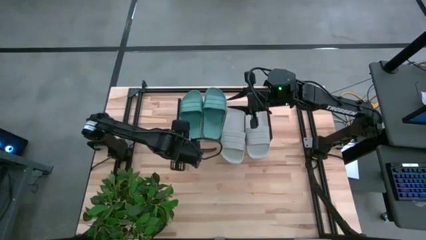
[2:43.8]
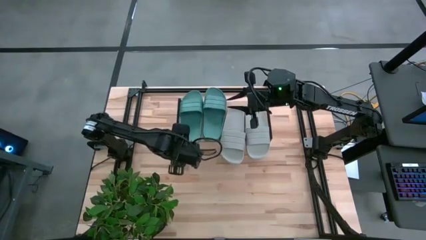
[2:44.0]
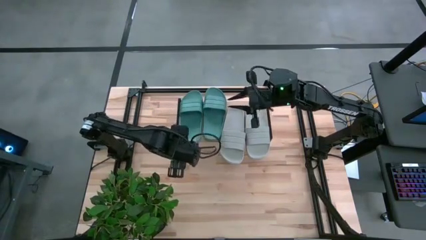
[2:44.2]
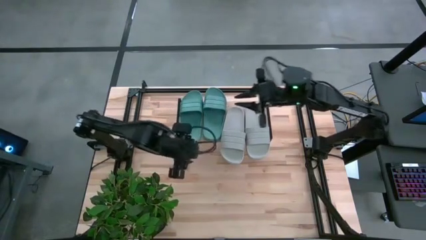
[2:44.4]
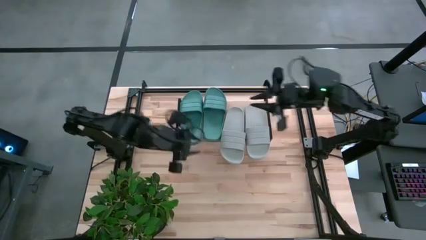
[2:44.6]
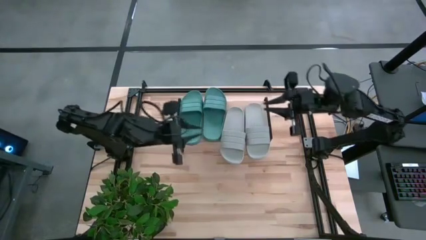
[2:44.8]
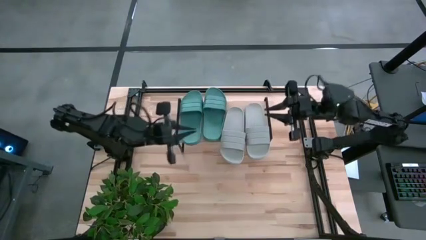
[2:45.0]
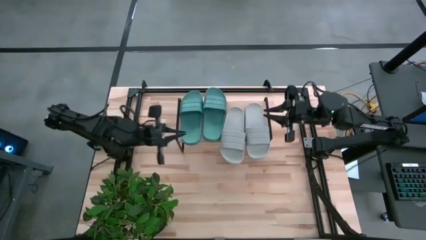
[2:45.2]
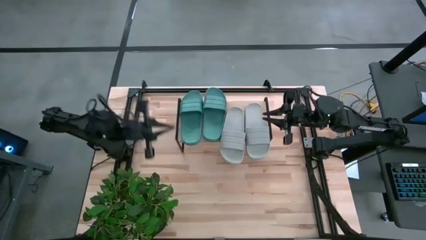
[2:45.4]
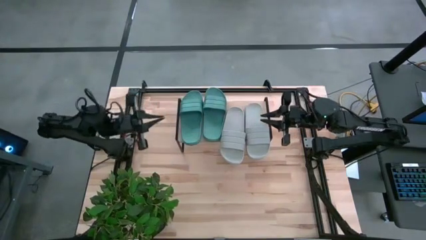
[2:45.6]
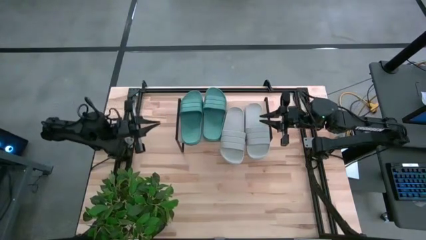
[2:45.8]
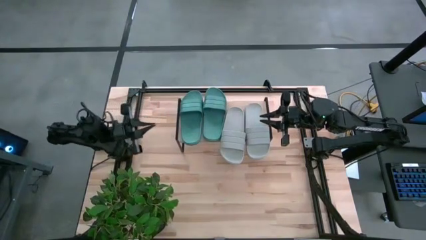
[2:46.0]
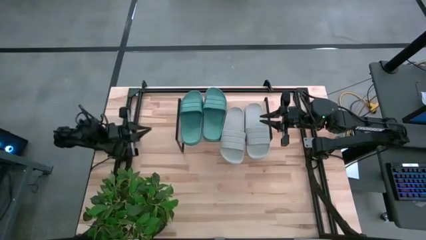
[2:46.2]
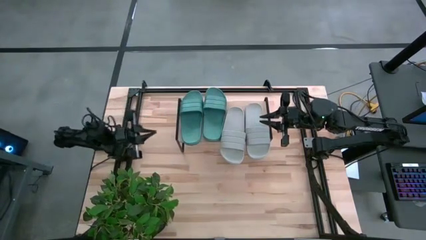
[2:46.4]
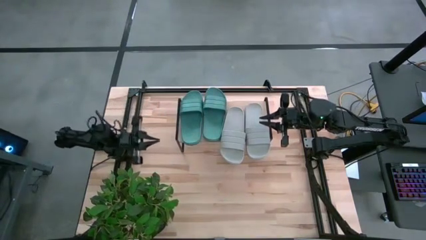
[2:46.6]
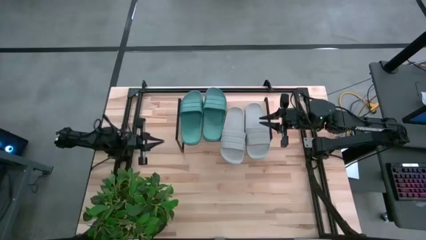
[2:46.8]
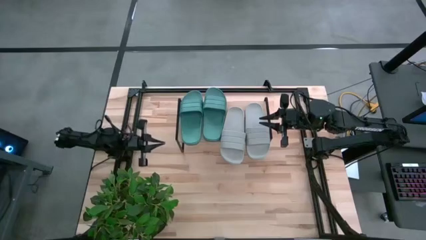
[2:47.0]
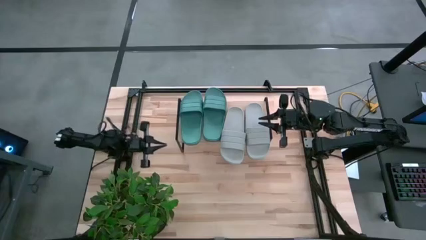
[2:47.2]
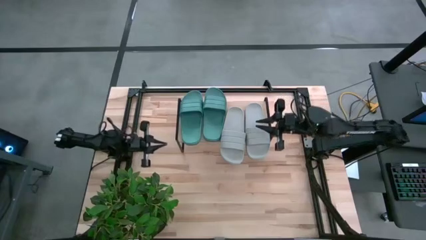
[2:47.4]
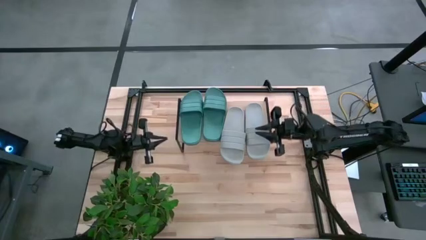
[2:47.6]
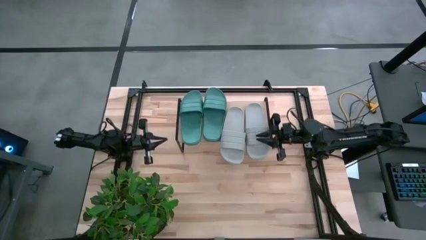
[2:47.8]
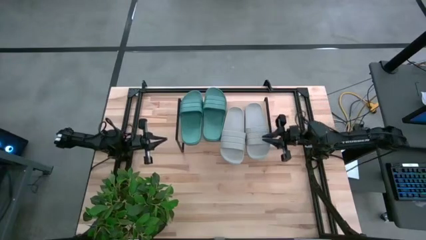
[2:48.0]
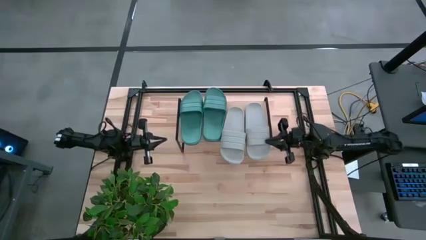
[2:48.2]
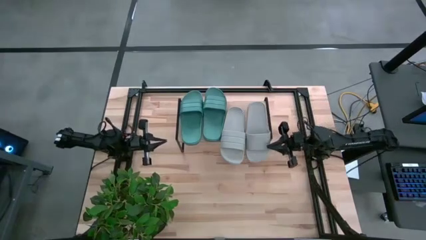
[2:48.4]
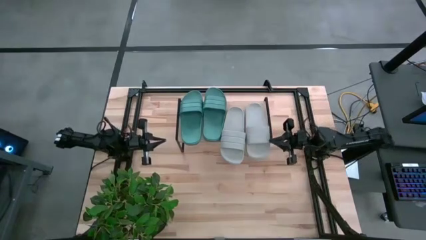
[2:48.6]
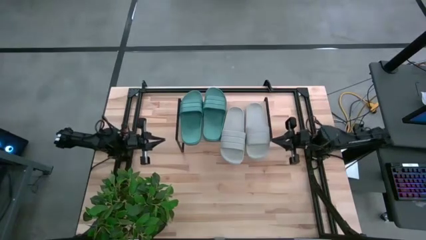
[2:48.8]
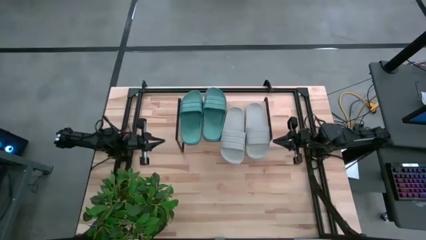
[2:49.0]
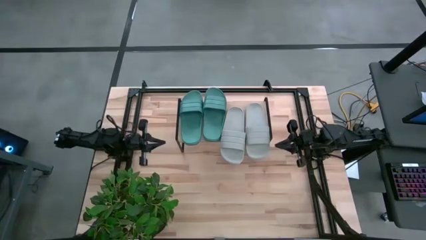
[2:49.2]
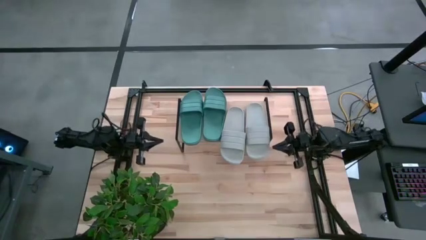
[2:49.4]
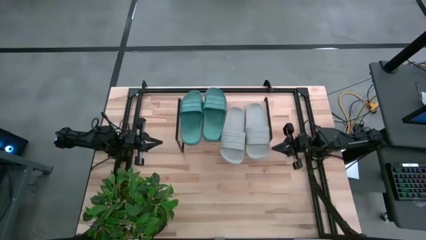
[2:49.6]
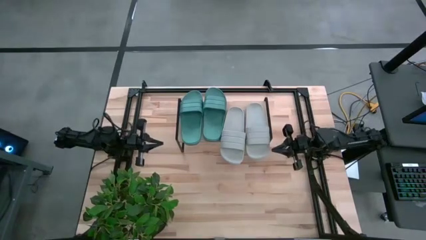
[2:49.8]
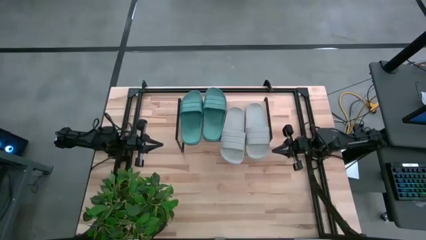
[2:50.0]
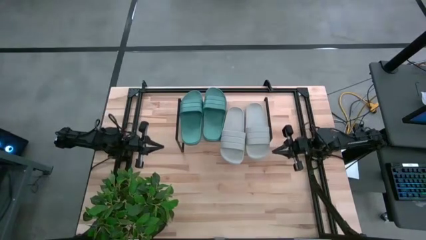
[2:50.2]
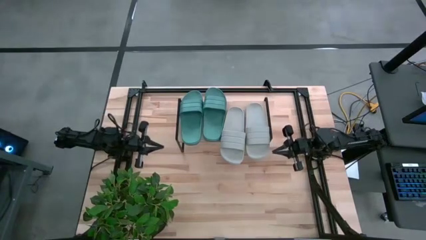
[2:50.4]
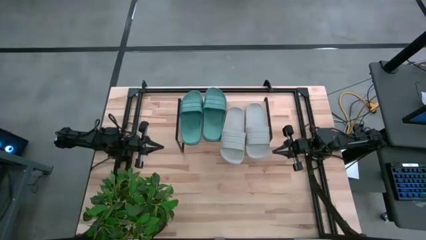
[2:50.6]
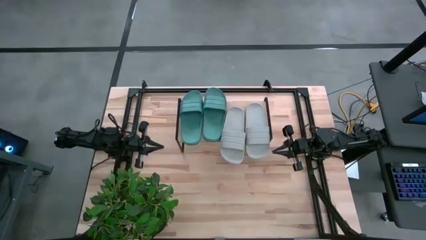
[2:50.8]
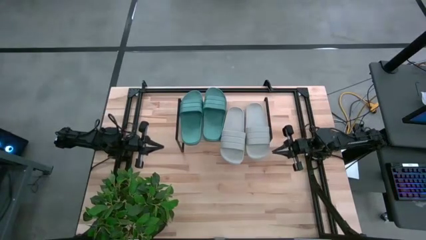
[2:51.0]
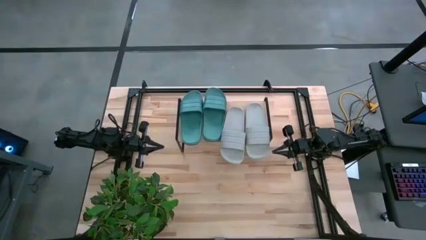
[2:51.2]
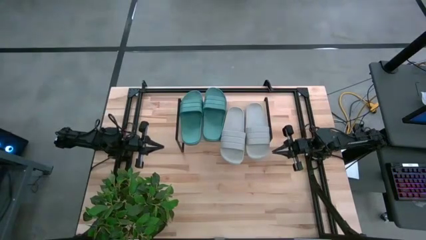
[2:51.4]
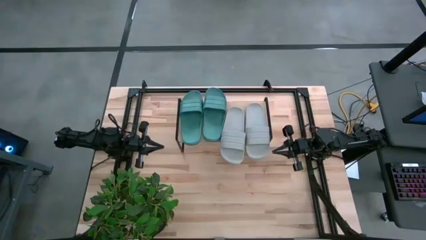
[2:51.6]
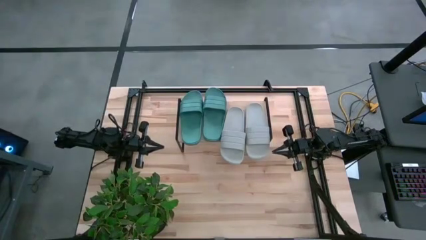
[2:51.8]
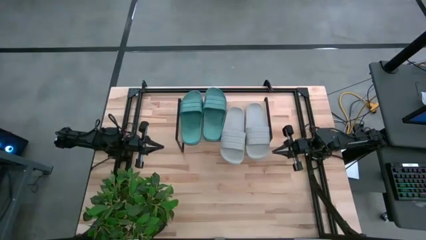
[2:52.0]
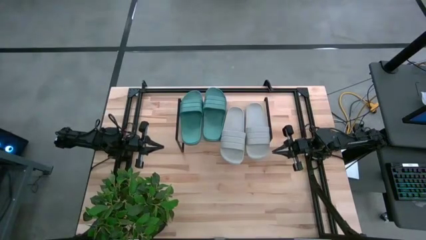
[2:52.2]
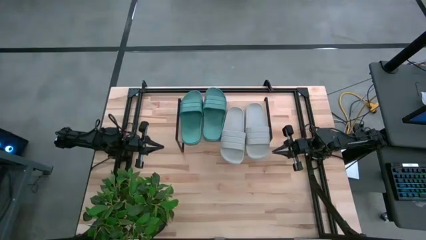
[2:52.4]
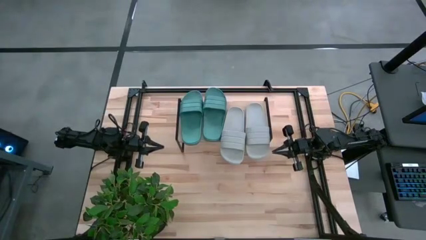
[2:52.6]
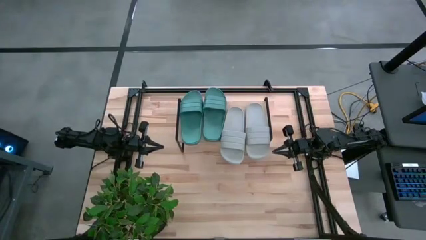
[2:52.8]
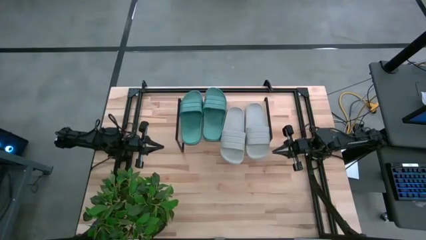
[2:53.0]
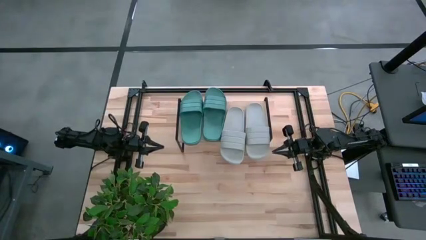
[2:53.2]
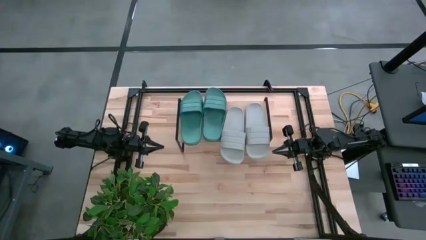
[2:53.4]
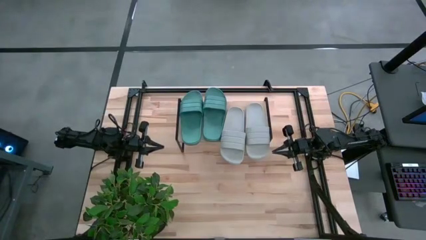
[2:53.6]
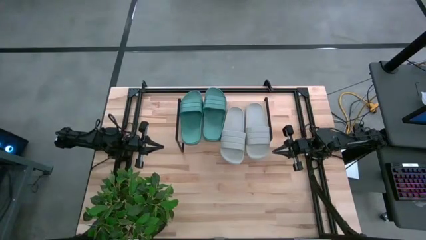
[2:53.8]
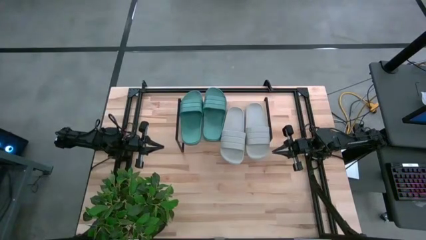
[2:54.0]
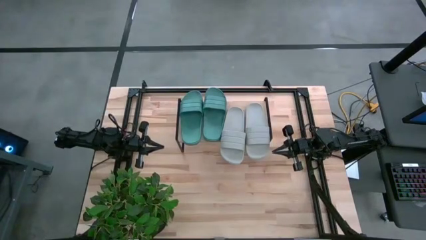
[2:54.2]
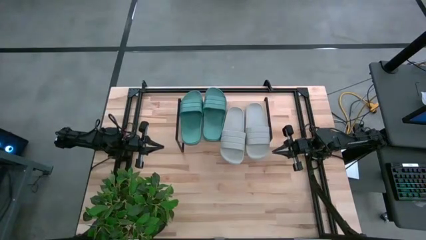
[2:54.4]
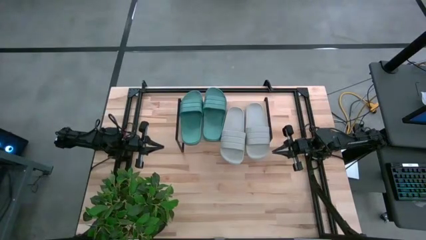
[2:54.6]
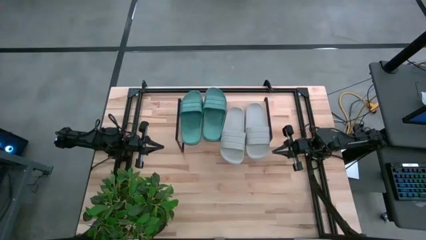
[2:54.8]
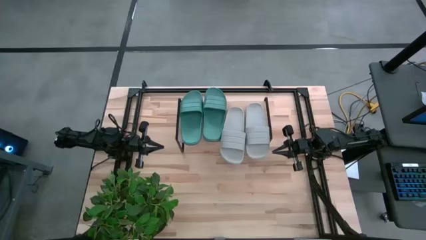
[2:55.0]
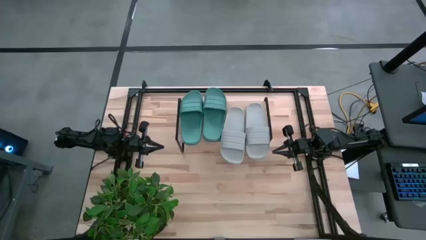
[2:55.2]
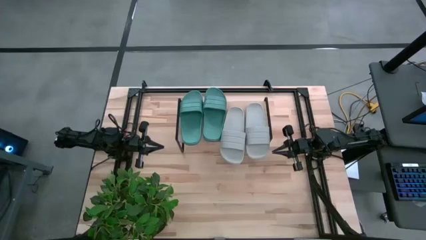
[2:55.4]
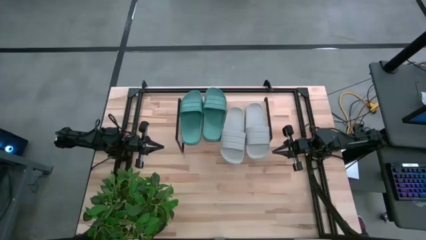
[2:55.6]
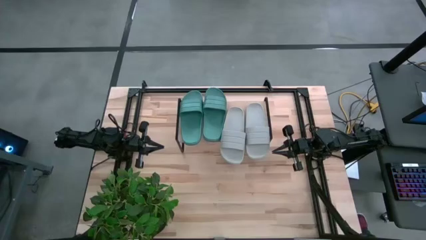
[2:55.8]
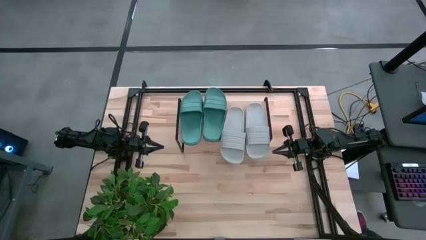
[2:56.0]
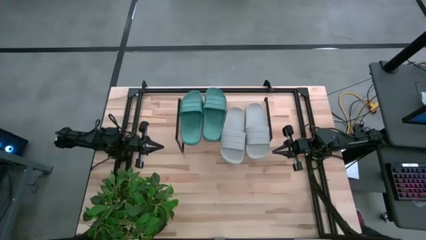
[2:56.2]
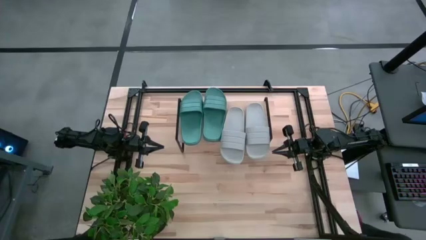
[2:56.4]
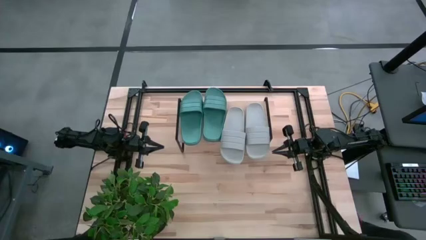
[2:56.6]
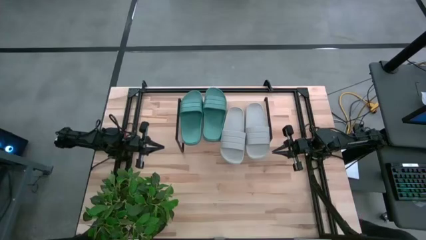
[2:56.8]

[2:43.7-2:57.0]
Task: Pick and place slides into the shelf
Return to Home Position

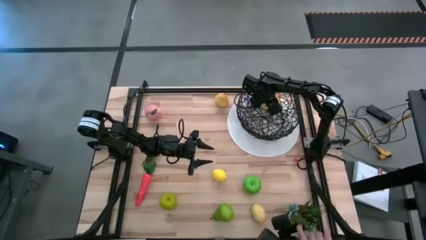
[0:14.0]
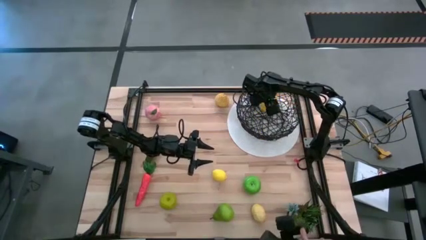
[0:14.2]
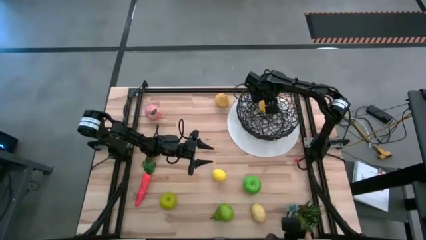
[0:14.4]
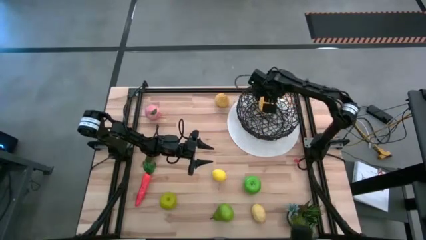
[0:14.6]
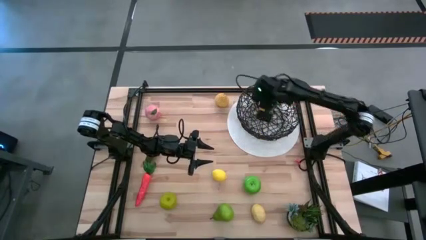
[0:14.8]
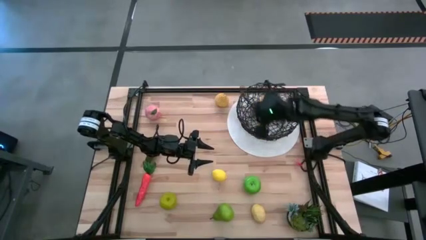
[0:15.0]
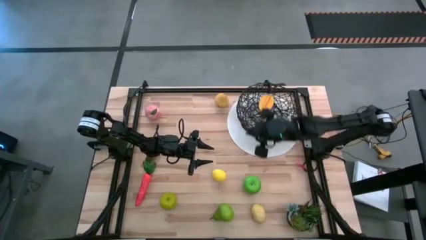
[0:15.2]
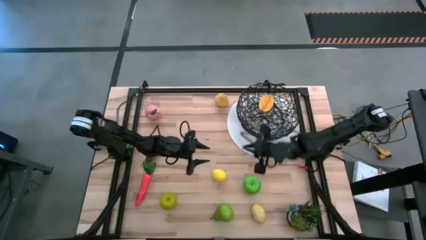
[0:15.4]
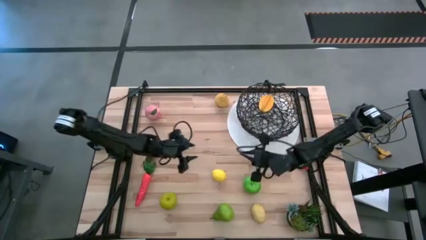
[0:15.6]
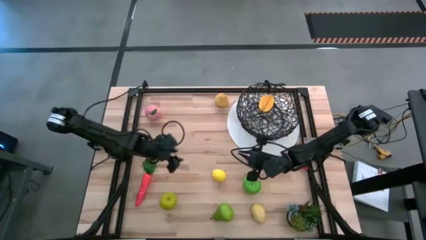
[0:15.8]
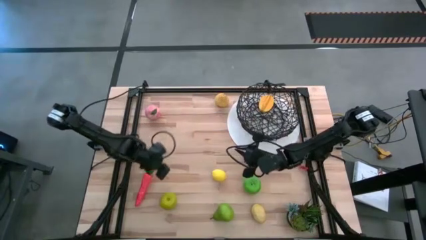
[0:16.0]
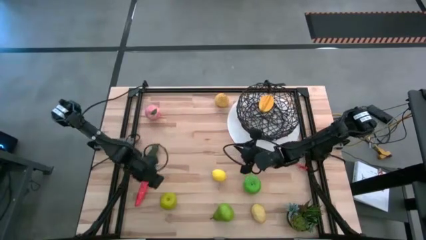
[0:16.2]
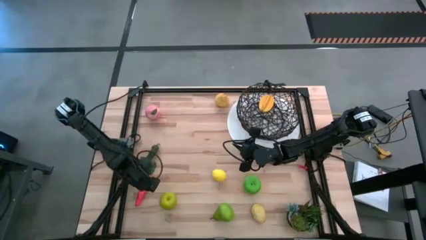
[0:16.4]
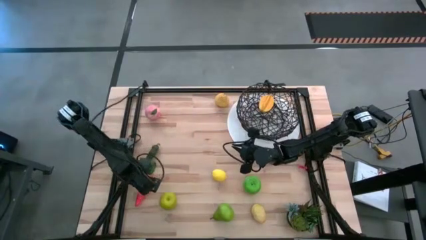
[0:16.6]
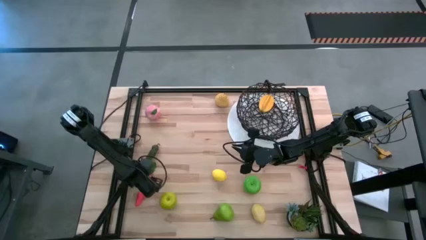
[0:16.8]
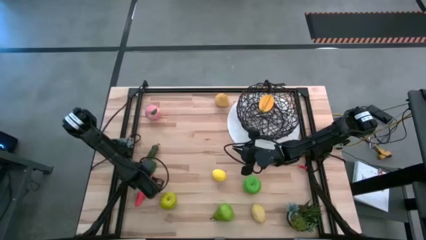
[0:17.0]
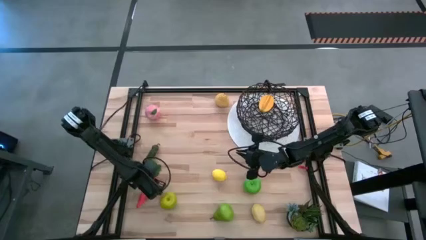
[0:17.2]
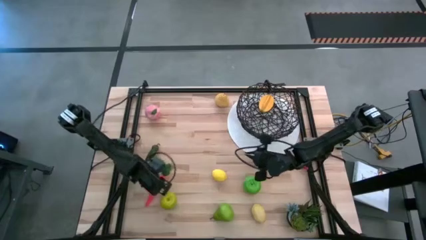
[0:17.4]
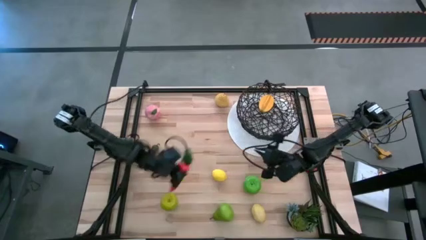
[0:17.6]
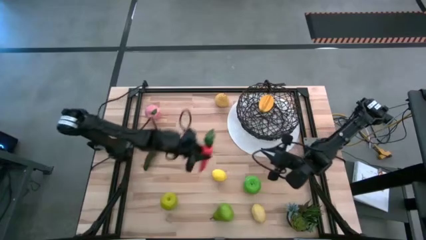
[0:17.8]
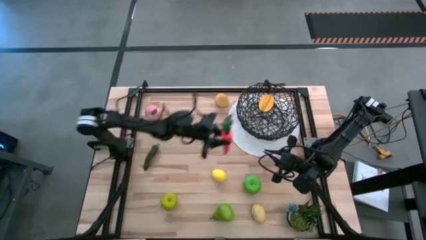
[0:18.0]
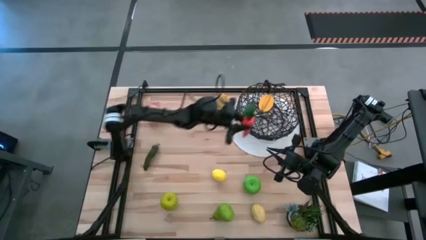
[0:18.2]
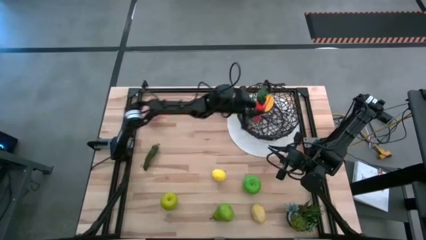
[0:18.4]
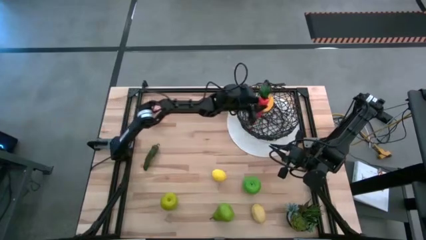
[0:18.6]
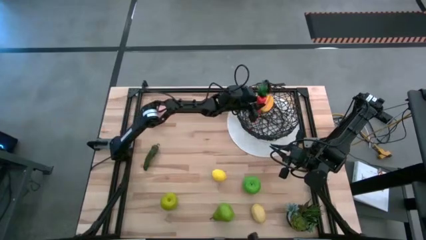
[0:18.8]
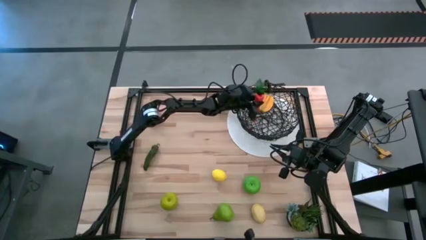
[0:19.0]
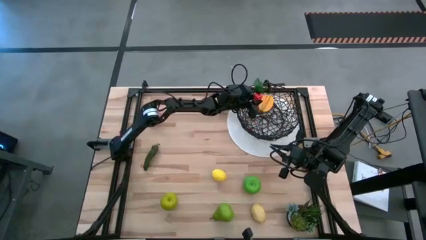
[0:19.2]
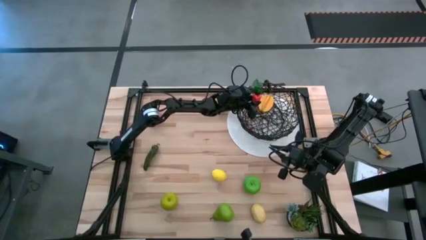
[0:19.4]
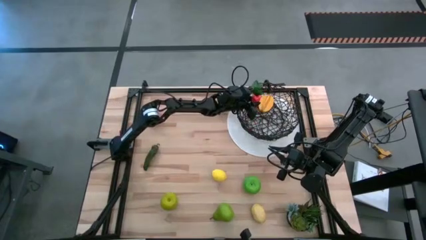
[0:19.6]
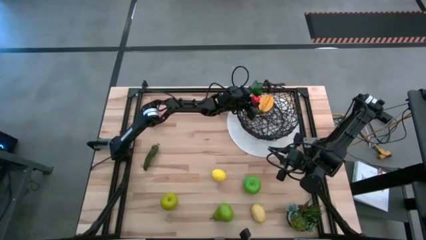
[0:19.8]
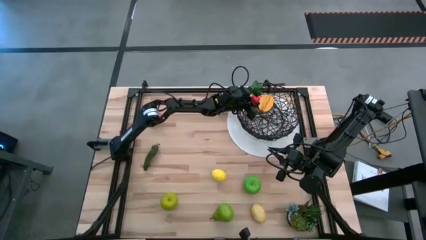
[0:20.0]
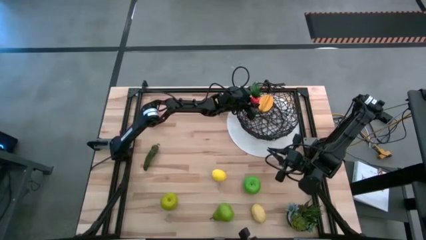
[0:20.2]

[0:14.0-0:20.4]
Task: Build produce basket
Put the orange carrot into the black wire basket
